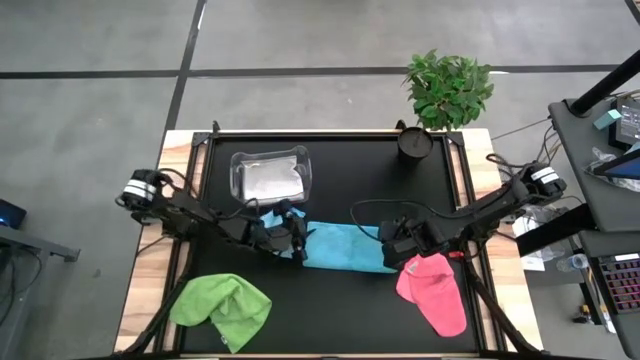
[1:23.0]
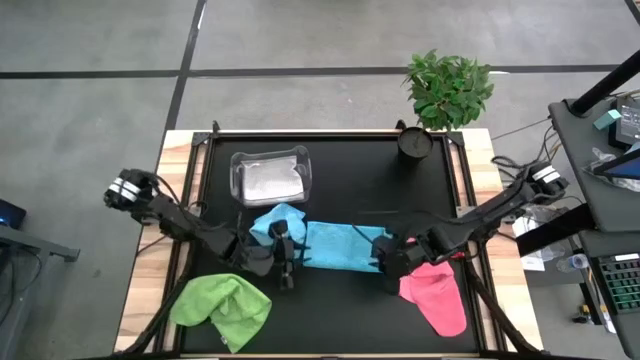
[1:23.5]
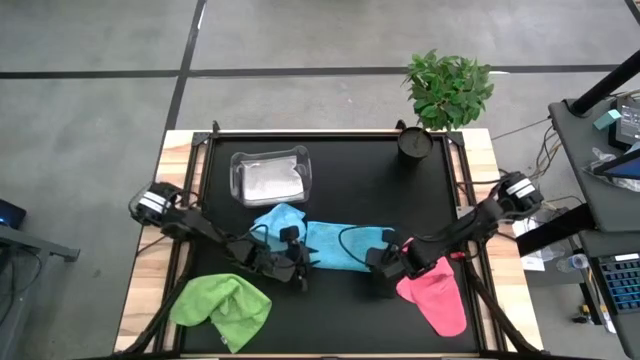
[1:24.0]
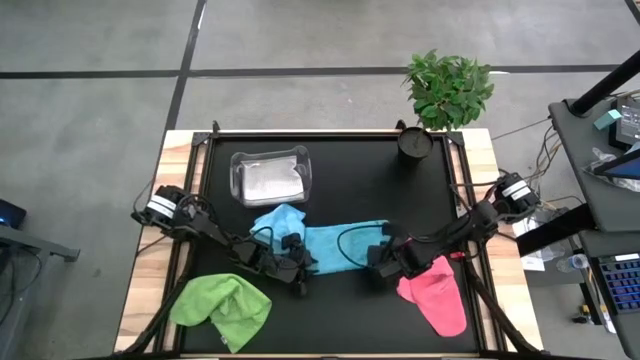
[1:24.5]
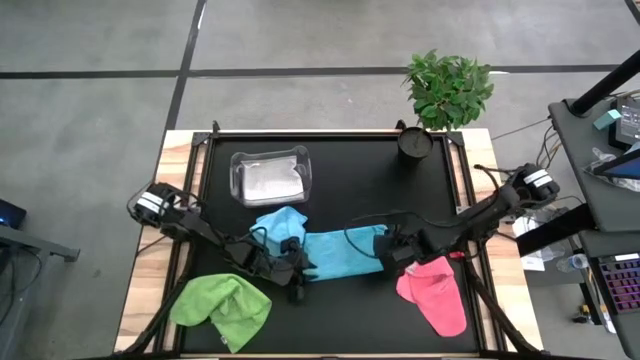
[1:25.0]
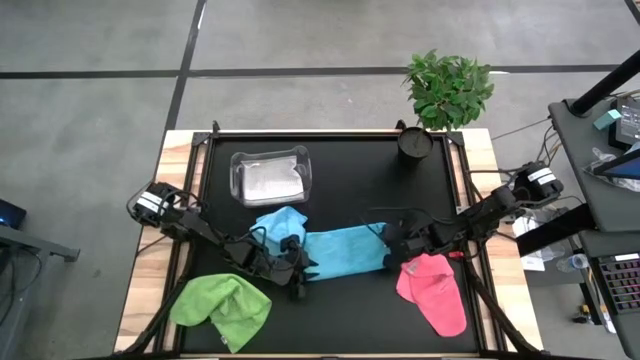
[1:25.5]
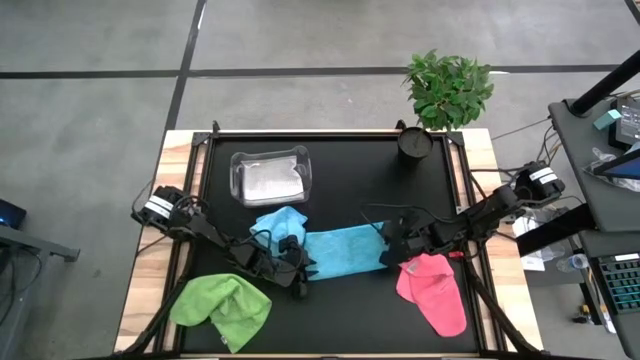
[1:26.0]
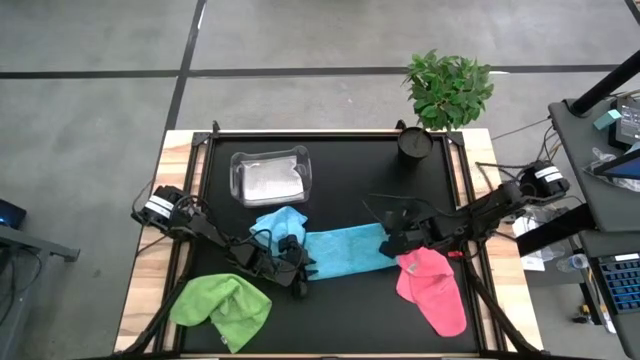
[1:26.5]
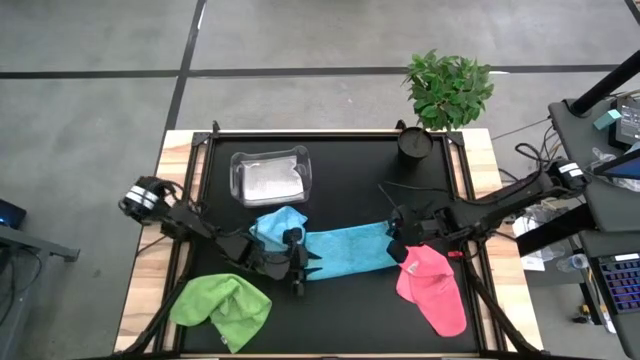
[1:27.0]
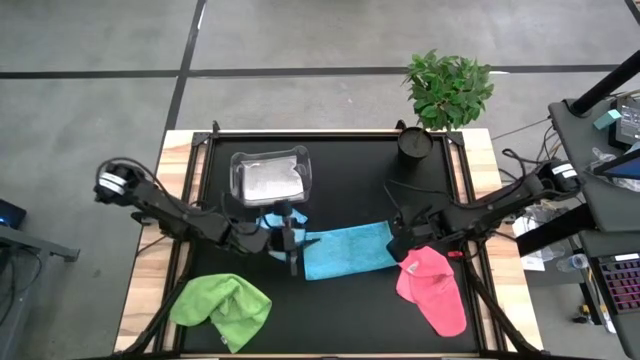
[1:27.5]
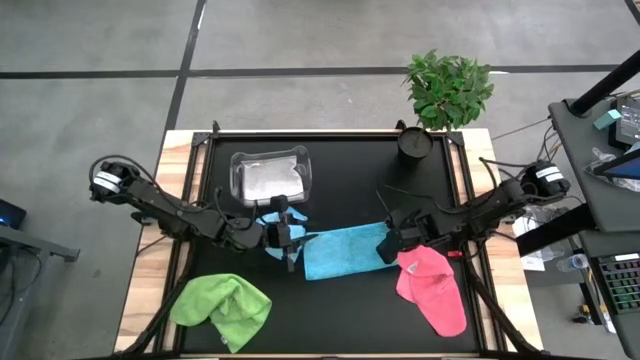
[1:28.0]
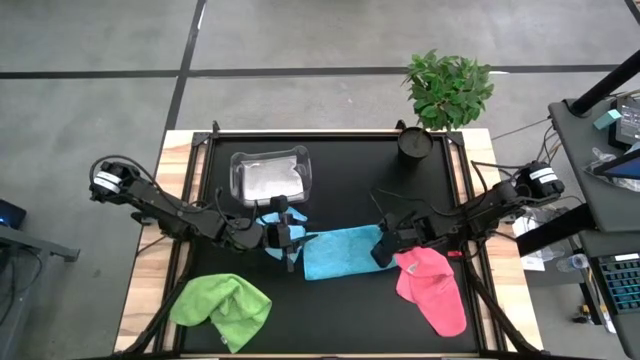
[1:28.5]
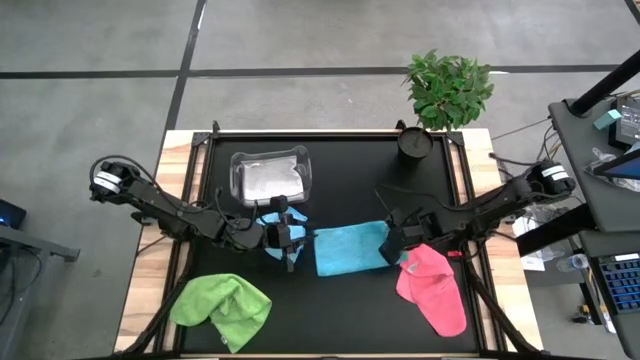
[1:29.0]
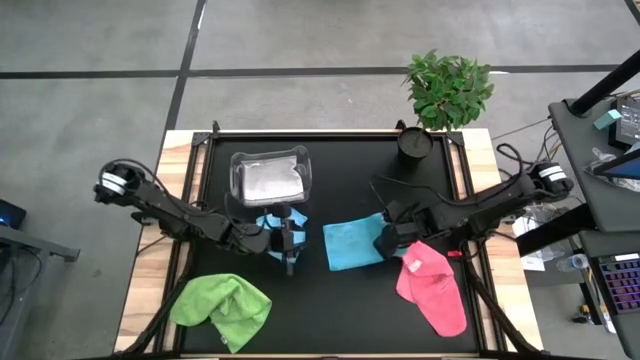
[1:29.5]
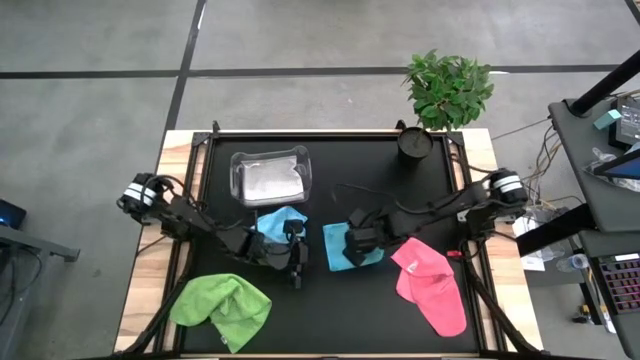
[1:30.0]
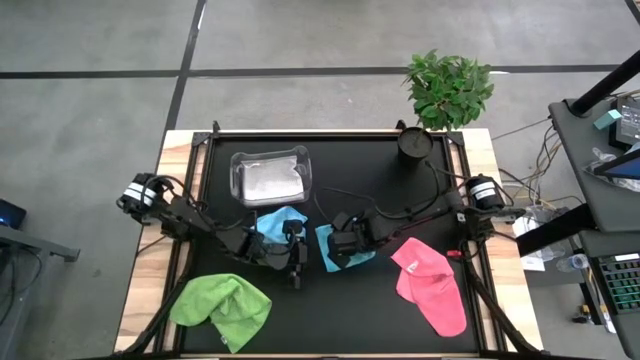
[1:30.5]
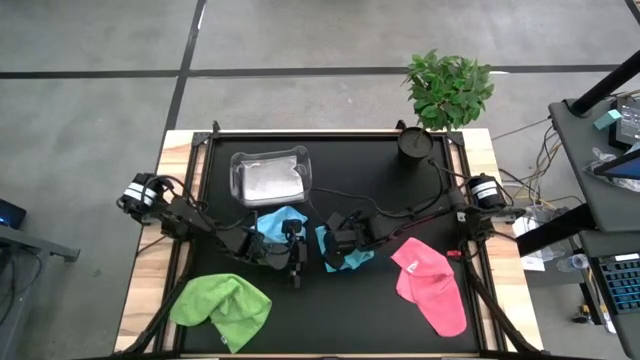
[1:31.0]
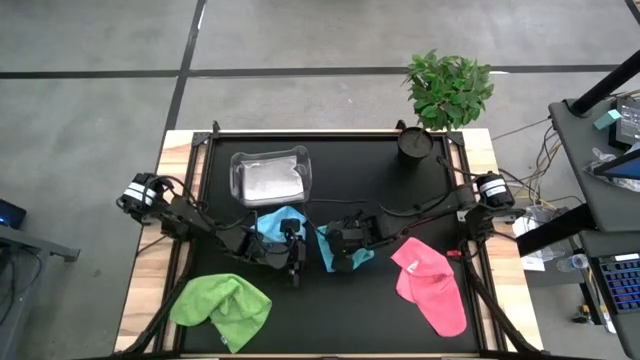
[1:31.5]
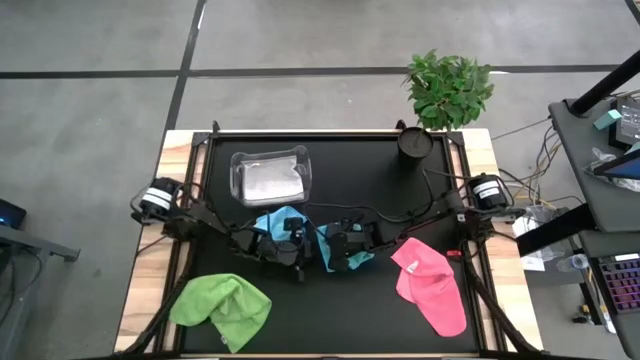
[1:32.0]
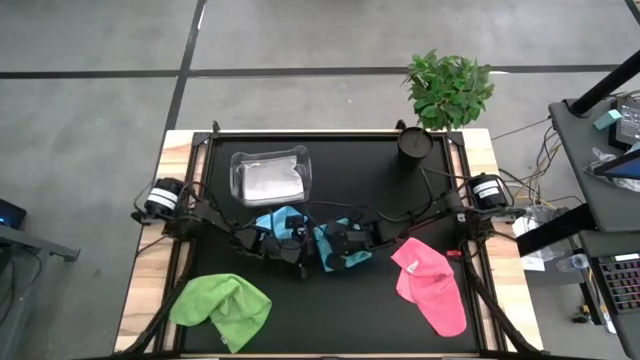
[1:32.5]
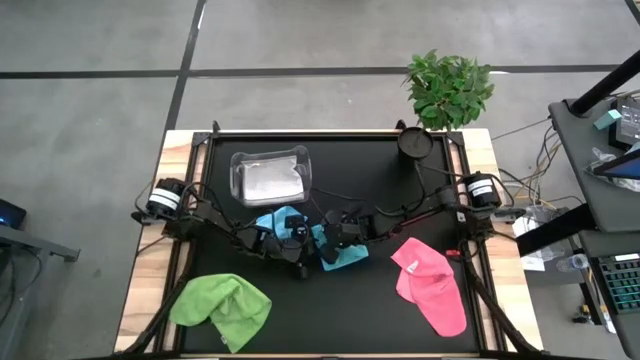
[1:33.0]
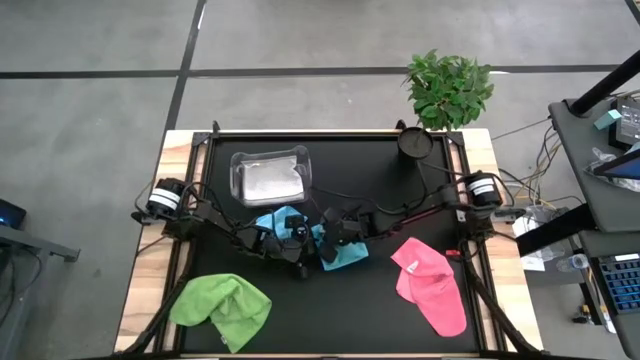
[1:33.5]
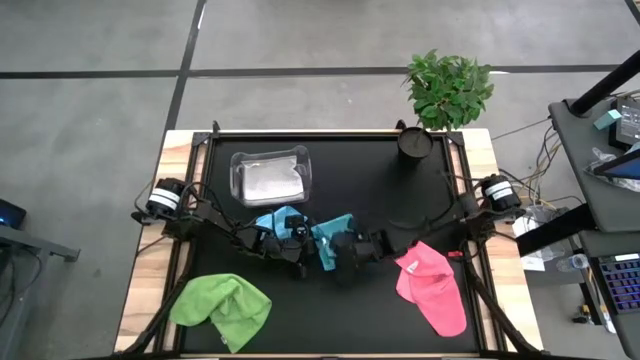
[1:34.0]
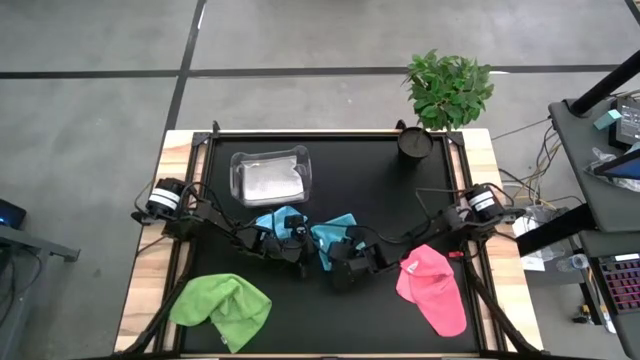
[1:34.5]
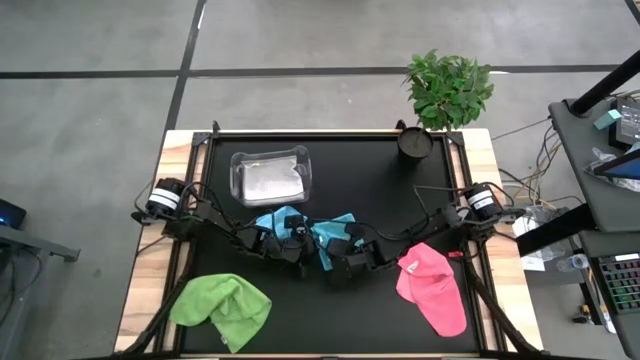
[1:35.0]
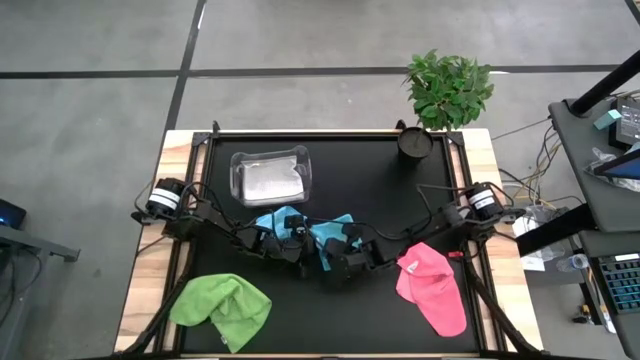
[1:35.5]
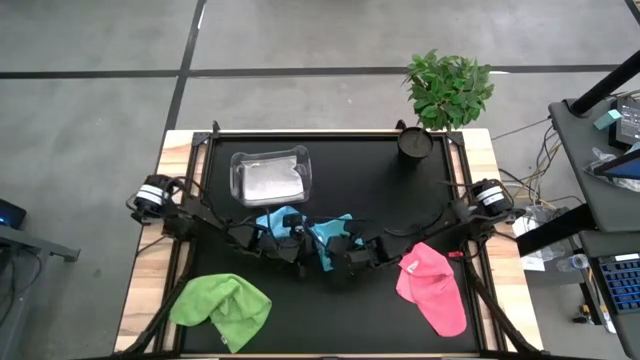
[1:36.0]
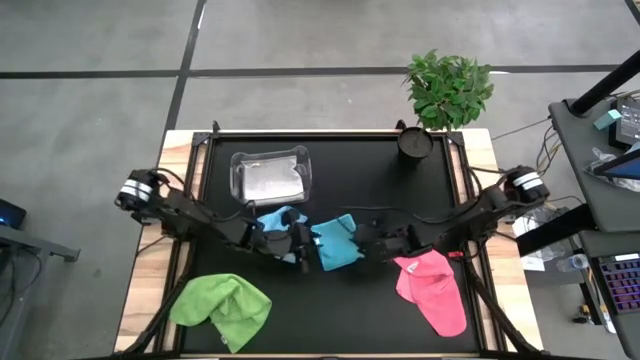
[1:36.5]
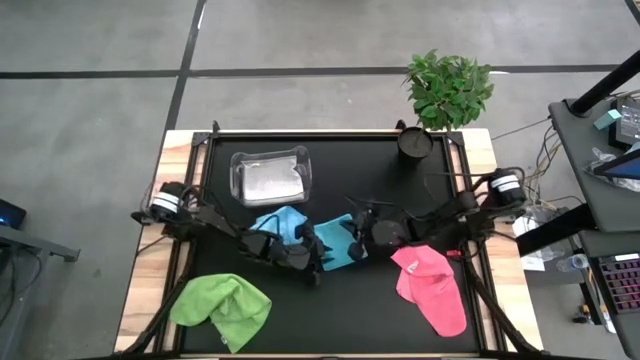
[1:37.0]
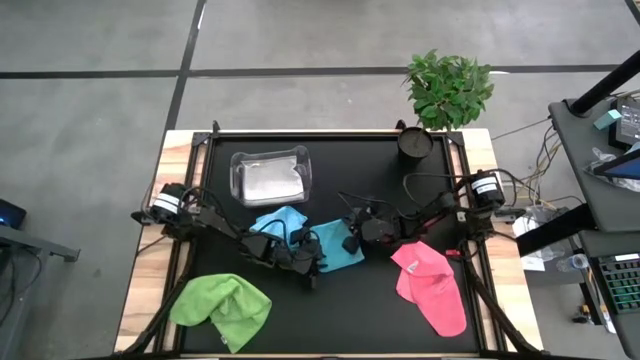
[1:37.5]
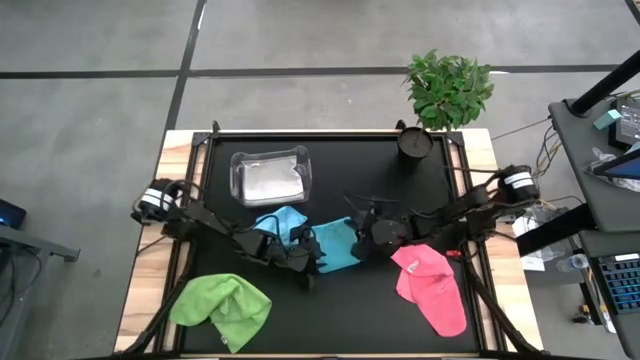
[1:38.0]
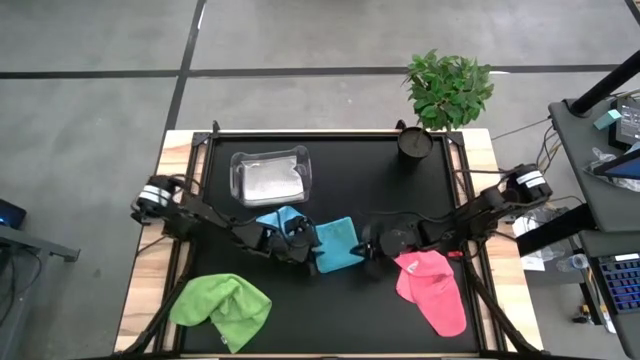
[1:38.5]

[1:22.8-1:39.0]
Task: Fold microfiber towels
Fold the right blue microfiber cloth

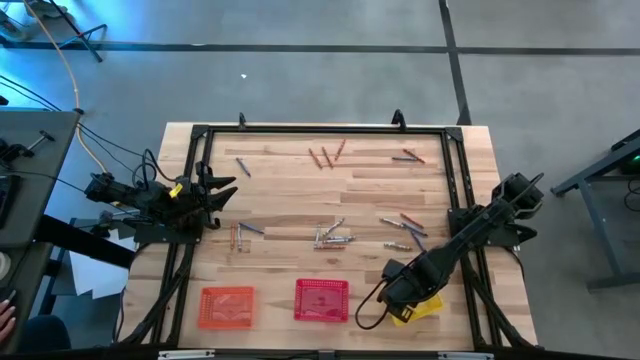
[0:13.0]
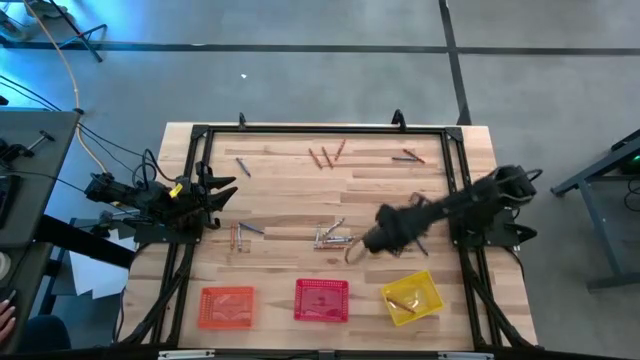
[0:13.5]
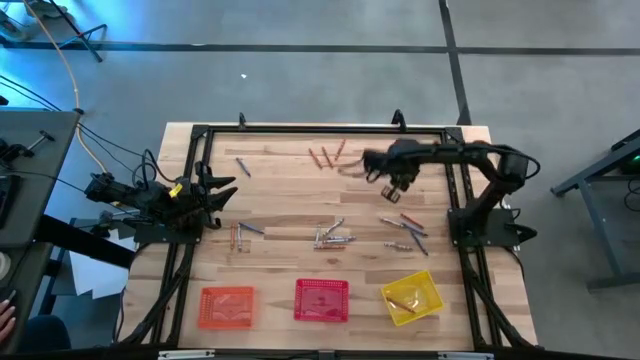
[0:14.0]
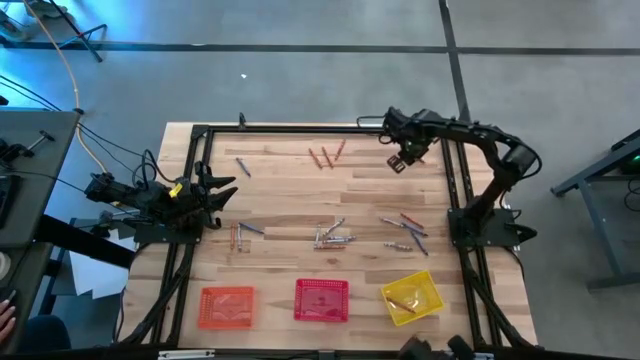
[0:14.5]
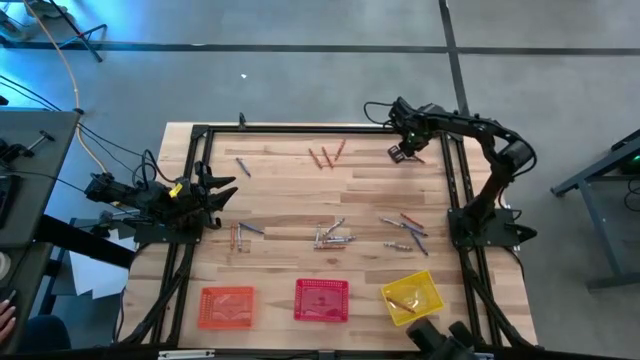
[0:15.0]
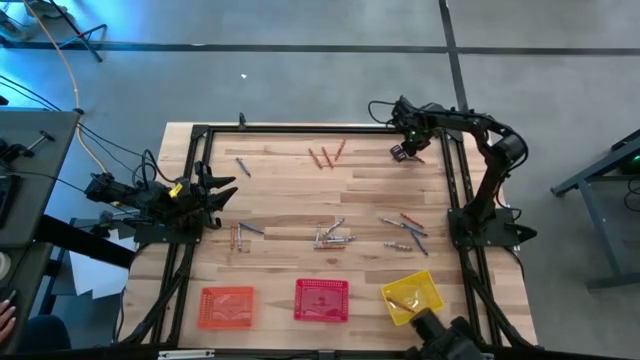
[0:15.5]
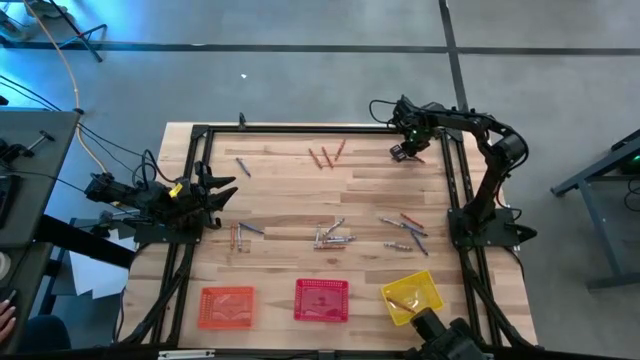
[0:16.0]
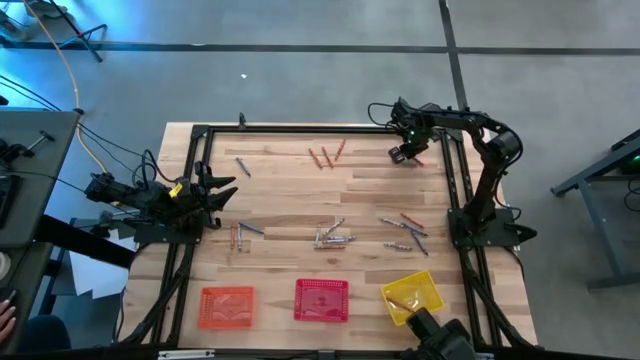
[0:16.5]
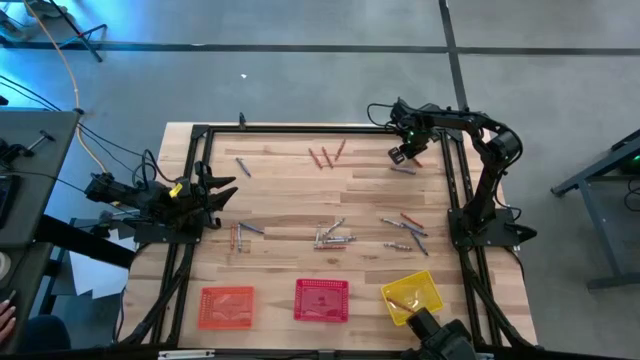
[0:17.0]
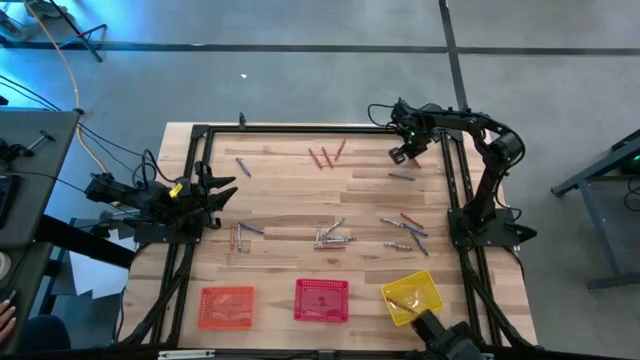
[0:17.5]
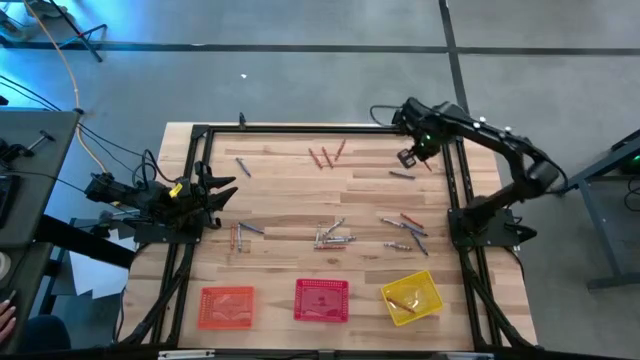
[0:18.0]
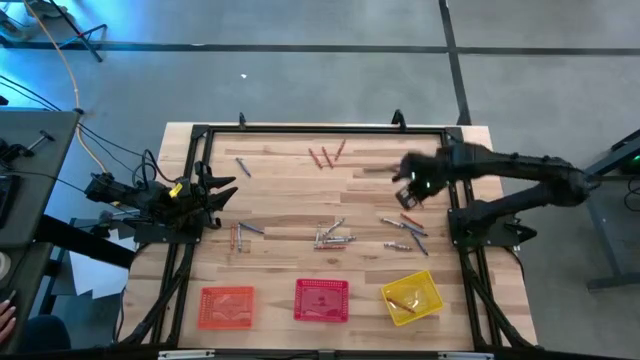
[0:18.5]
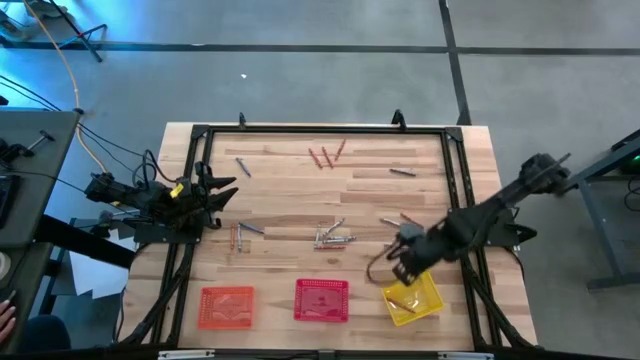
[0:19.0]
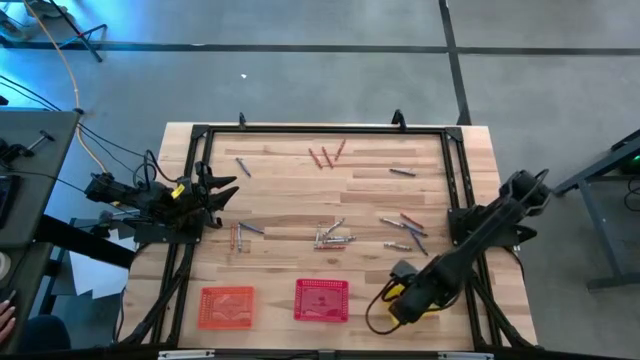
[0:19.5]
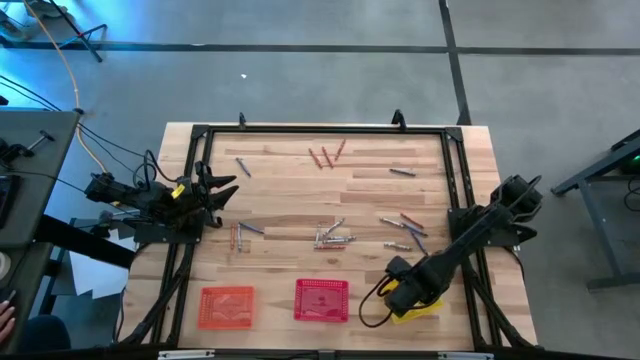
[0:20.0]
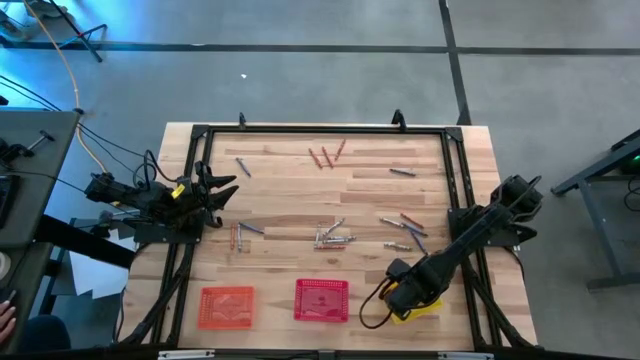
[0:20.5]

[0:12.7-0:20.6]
Task: Sort crayons
Put the orange crayon into the yellow bin
